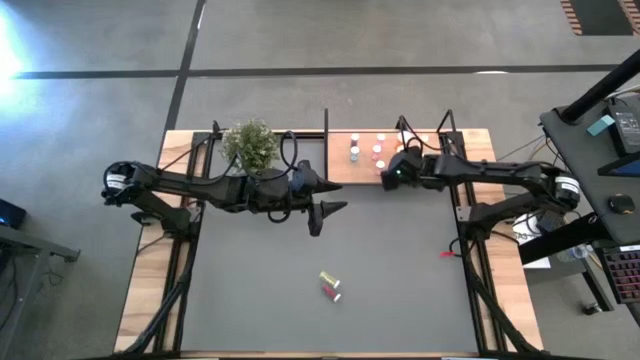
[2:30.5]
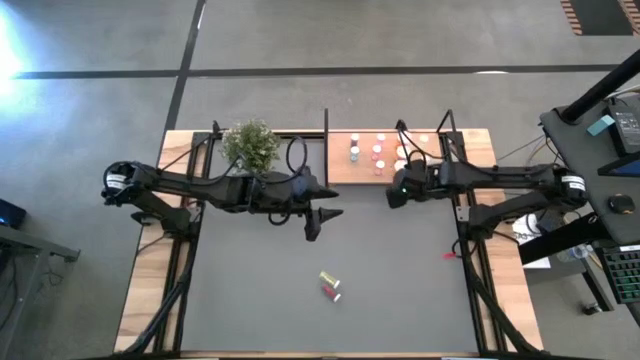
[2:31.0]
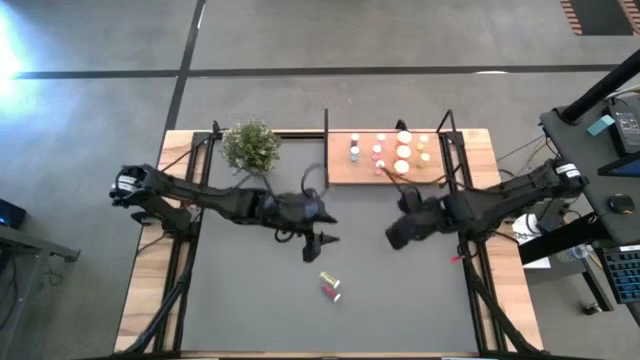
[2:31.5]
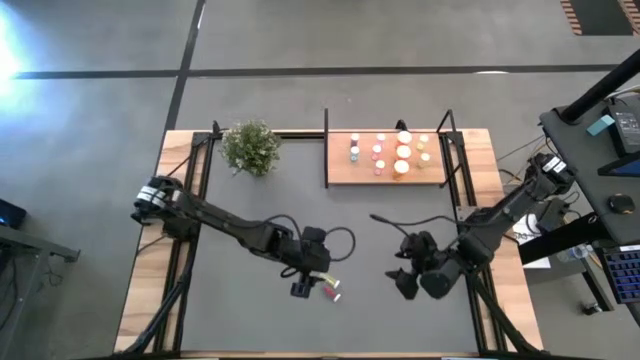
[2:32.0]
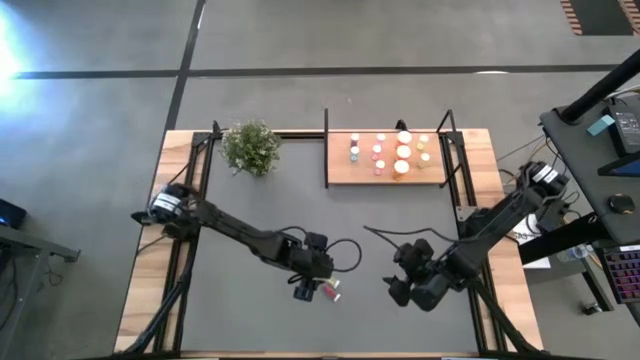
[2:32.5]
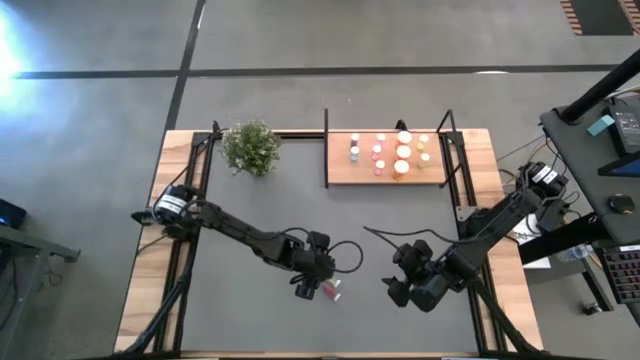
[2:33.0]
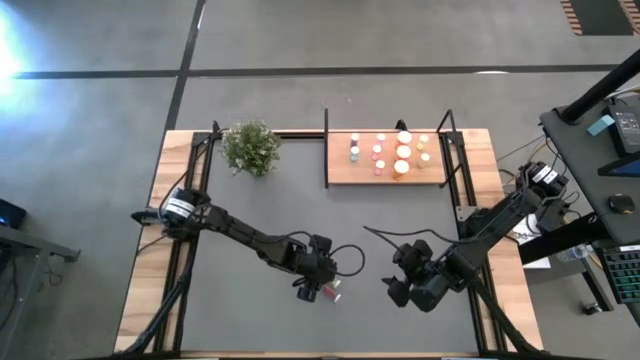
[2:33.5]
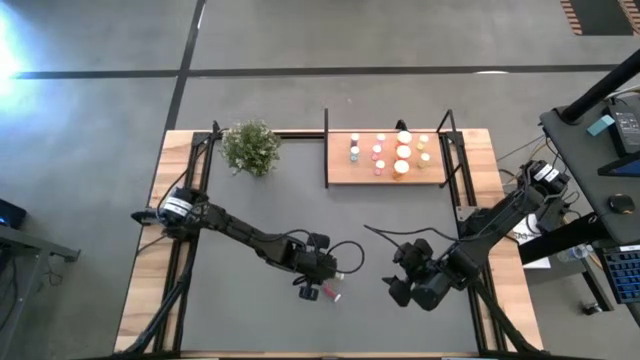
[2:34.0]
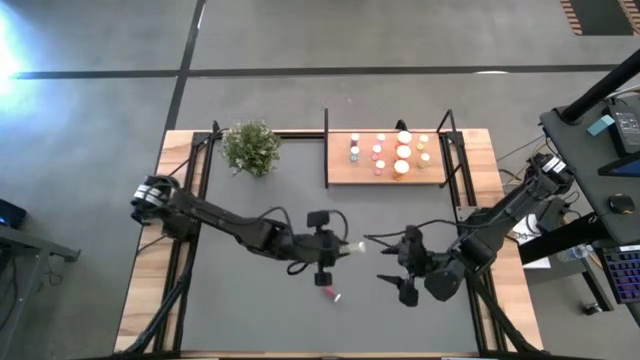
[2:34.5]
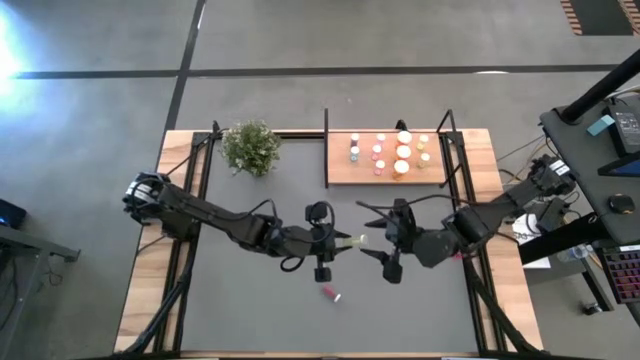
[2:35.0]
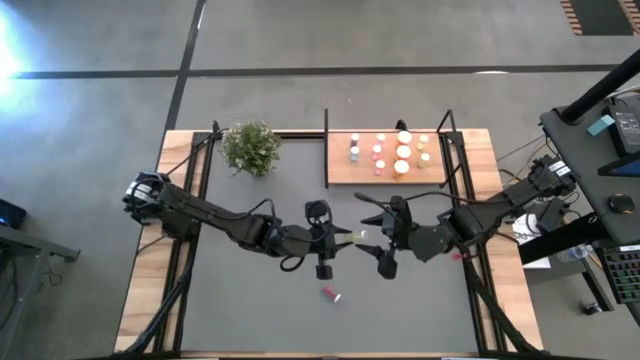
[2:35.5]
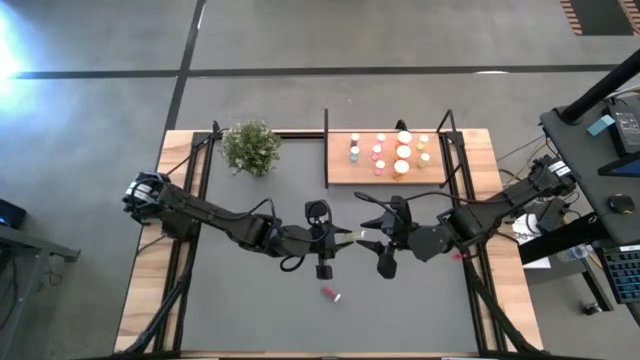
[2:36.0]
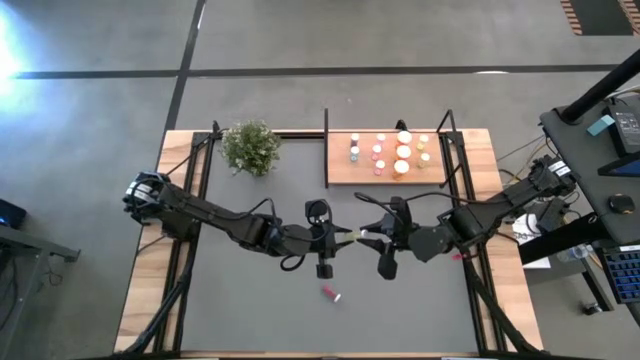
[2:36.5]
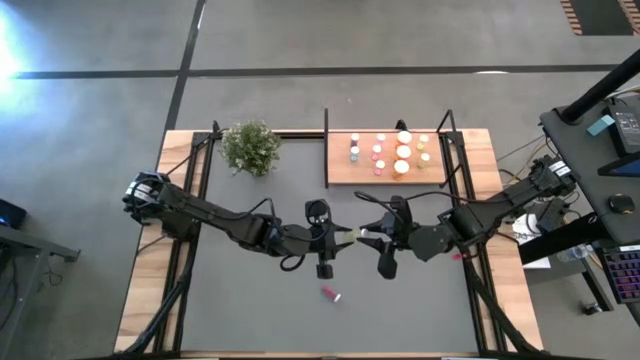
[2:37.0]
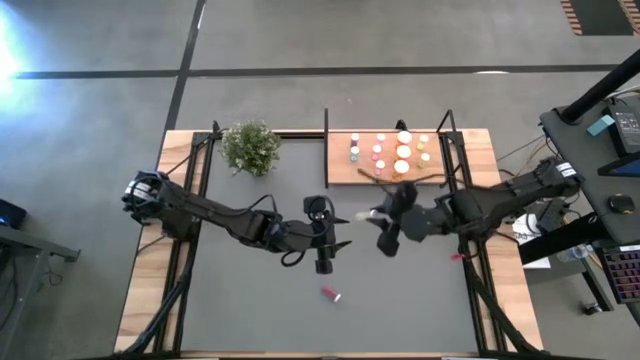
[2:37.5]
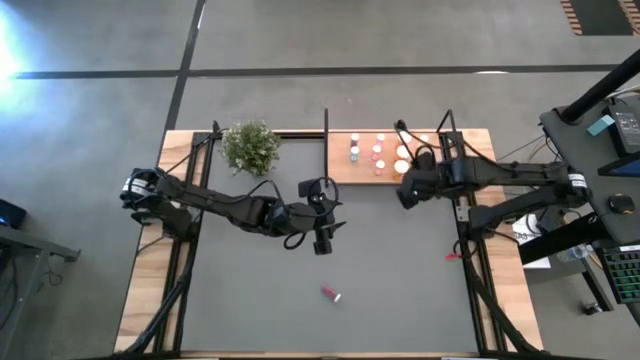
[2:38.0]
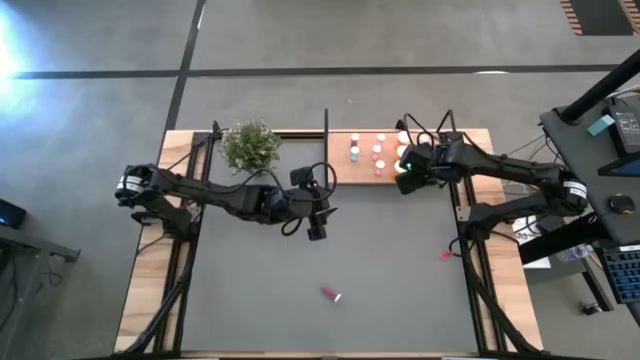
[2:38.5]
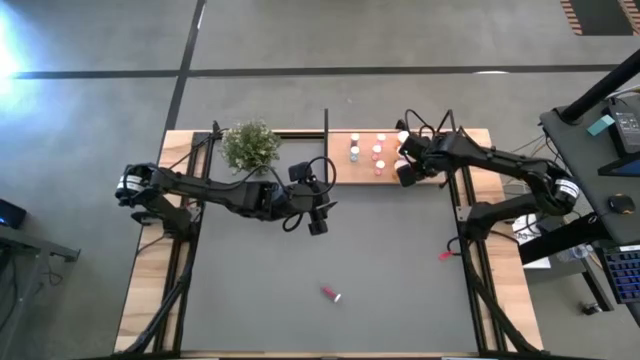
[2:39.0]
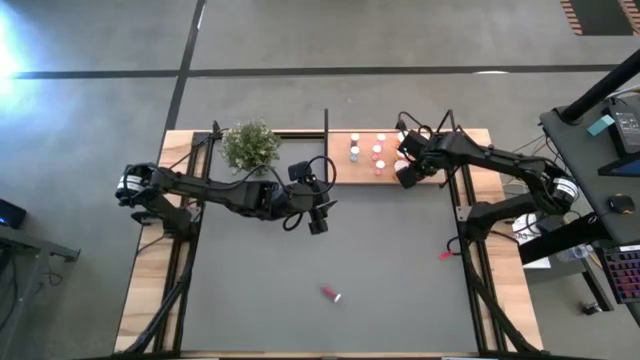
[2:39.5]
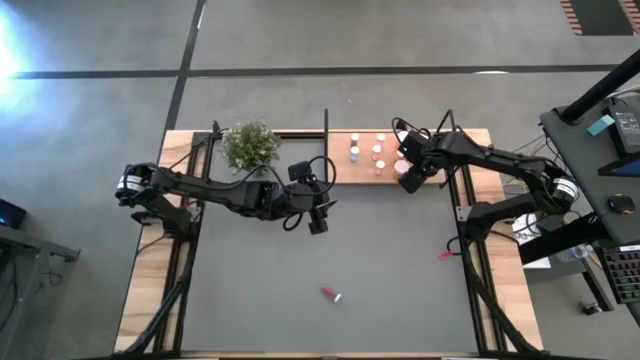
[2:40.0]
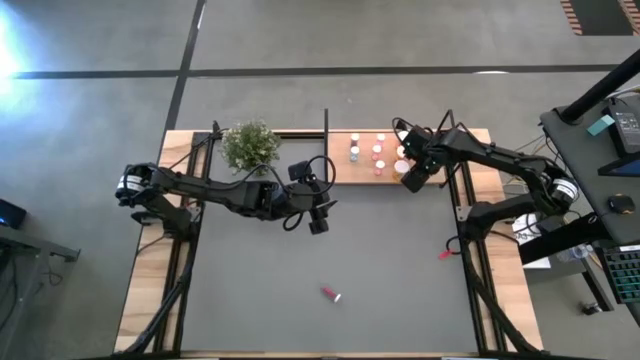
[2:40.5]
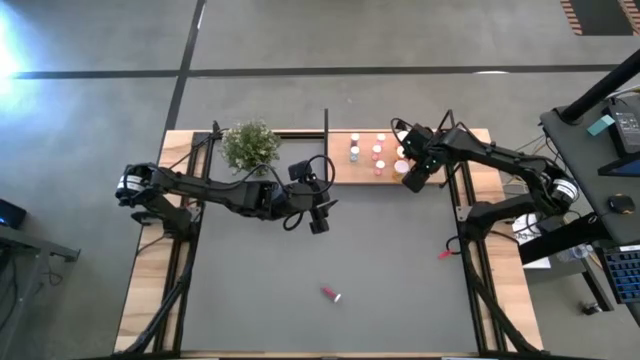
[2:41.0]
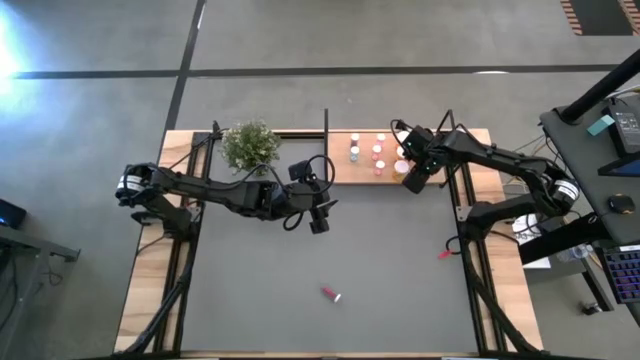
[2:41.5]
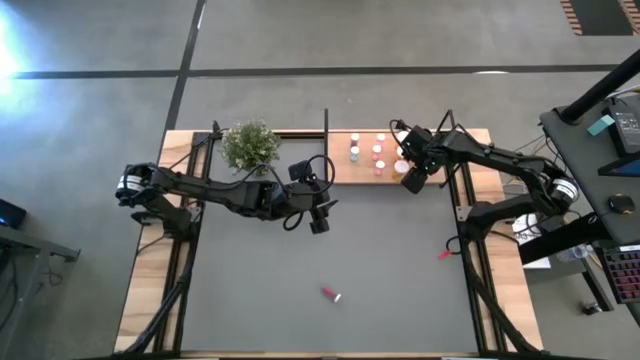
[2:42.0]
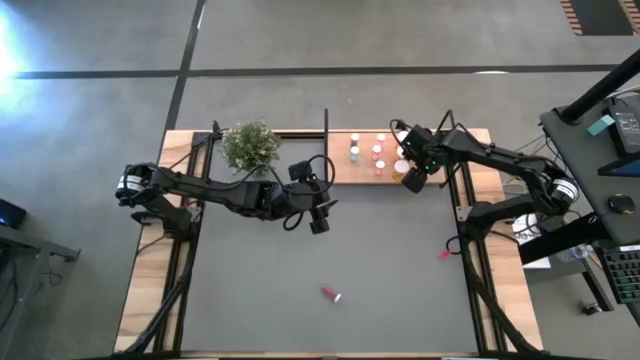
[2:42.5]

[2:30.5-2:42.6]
Task: Pick and place medicine bottles onto shelf by color
Put the yellow pill bottle on the shelf aligned with the other yellow pill bottles

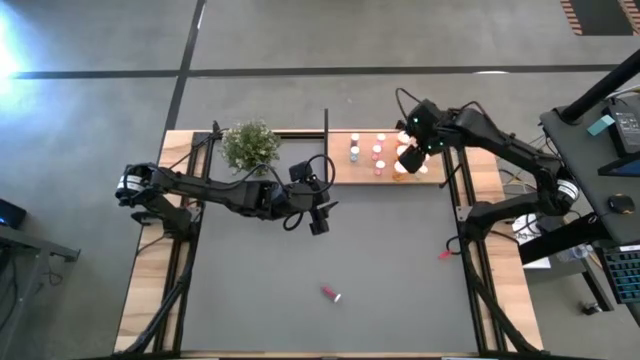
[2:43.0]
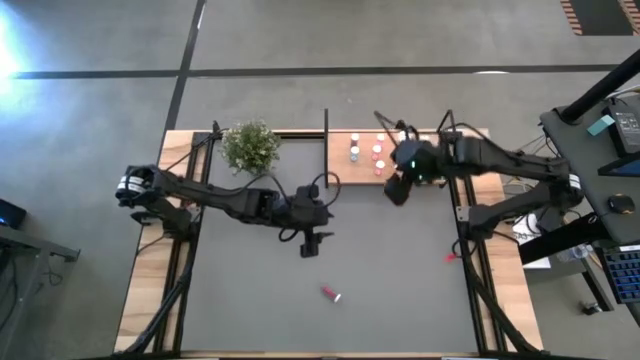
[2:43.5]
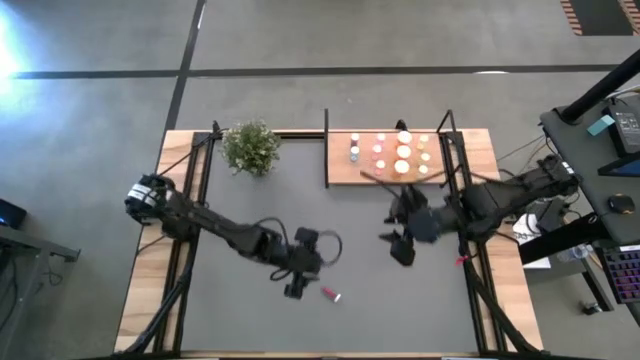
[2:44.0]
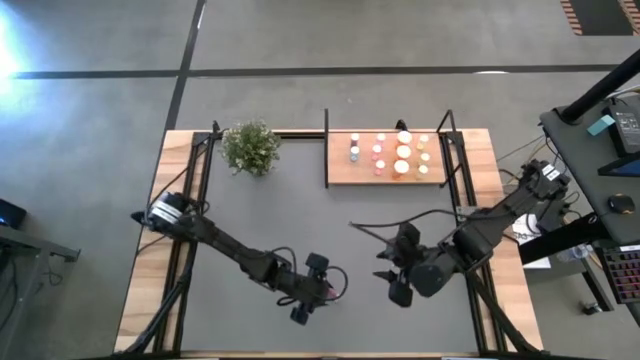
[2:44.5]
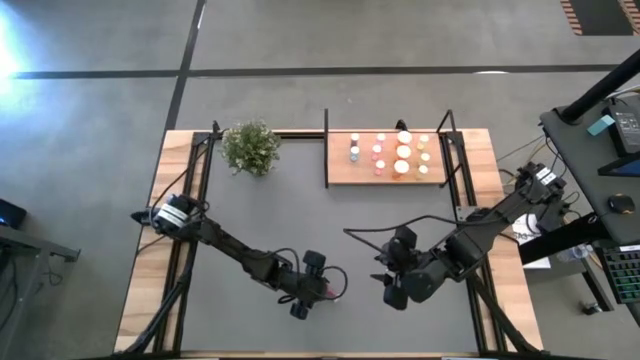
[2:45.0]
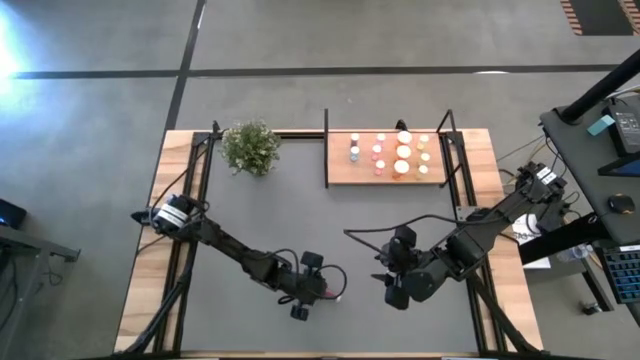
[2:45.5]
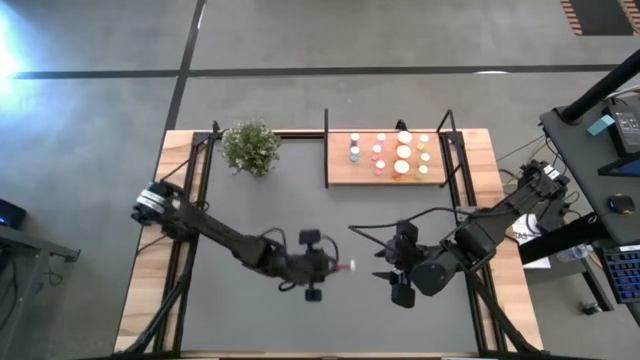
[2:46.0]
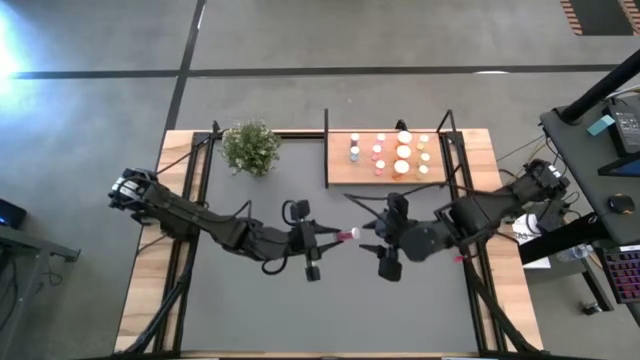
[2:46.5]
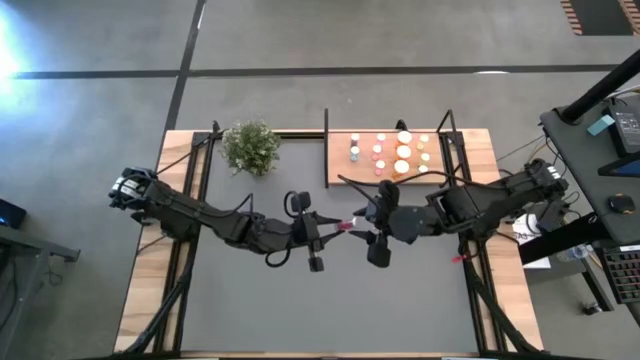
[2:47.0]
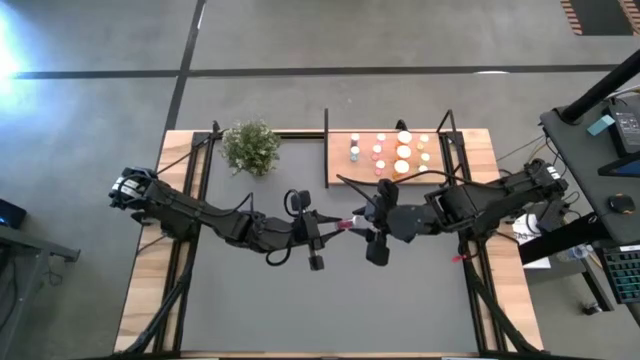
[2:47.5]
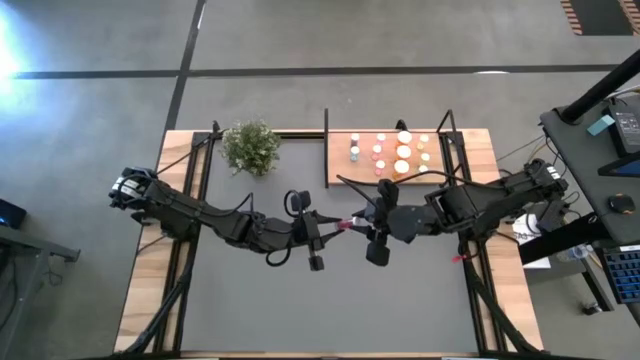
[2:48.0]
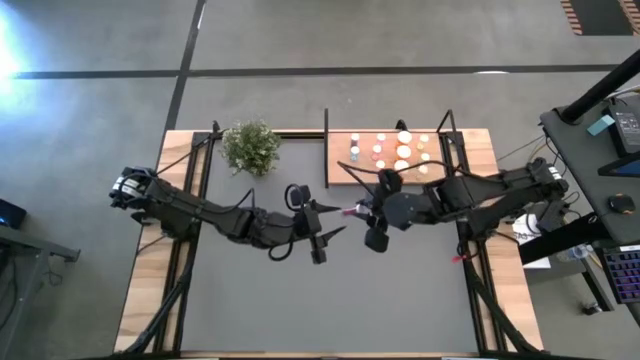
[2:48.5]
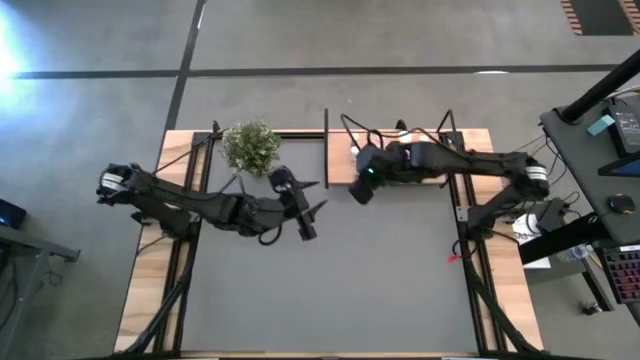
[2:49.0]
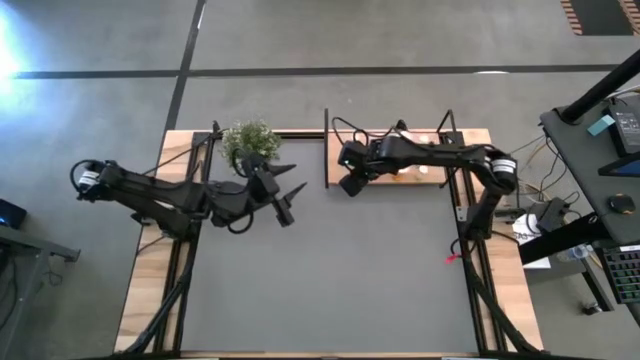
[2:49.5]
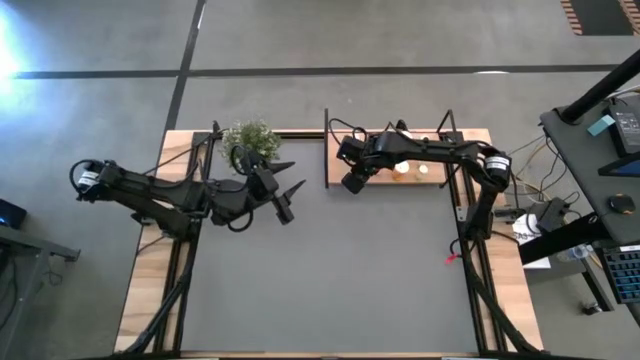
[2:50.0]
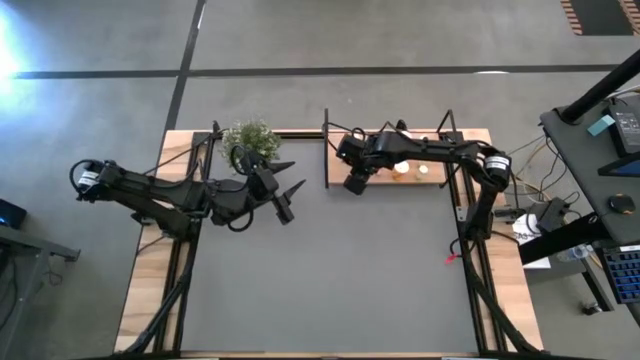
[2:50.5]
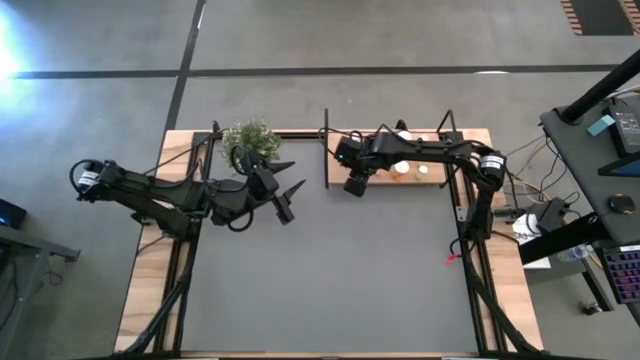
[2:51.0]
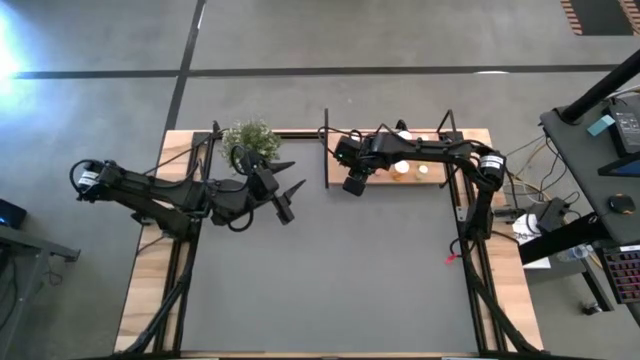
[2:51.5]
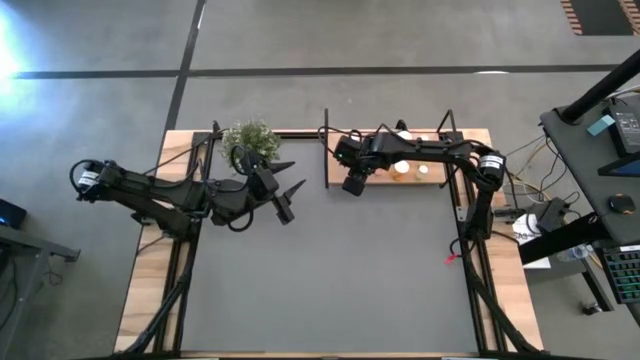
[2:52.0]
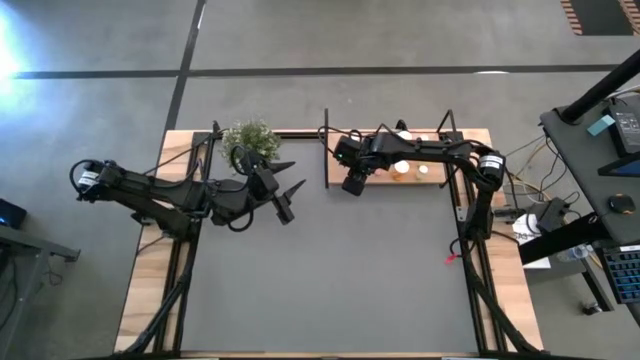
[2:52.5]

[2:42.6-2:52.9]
Put the blue pill bottle on the shelf aligned with the other blue pill bottles
